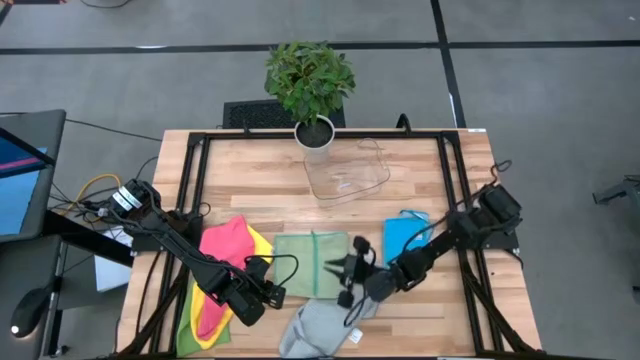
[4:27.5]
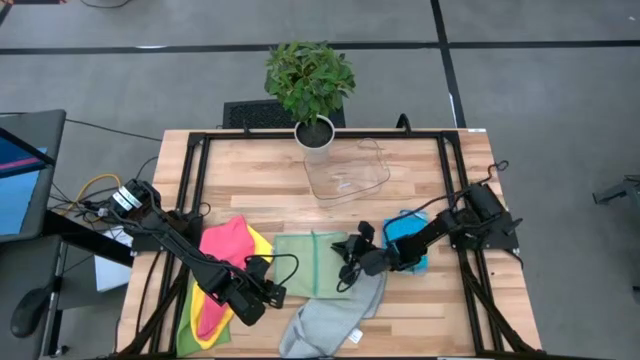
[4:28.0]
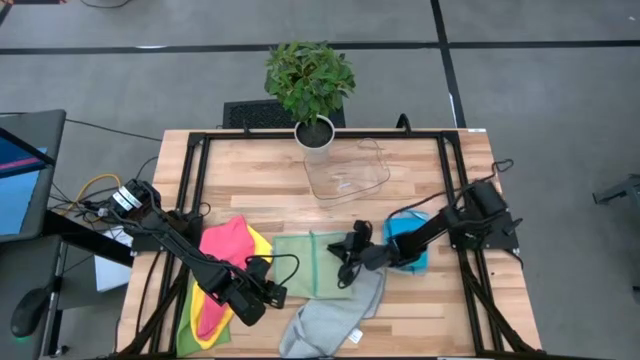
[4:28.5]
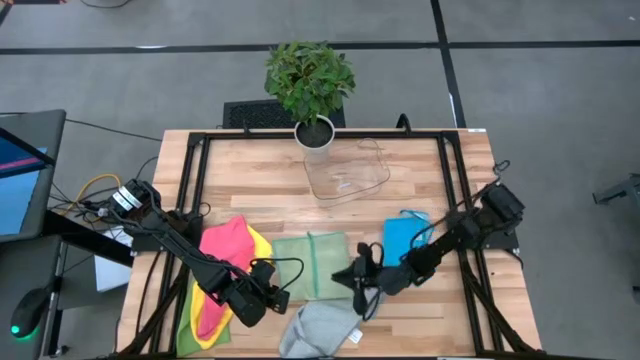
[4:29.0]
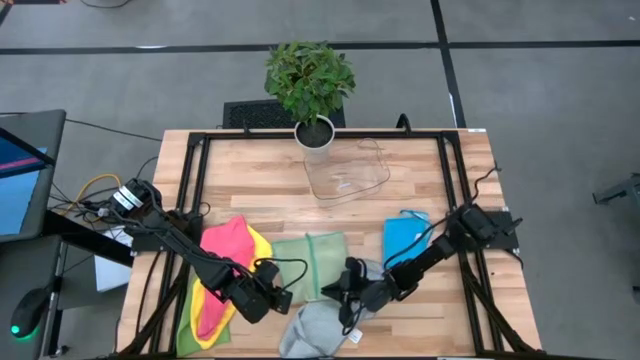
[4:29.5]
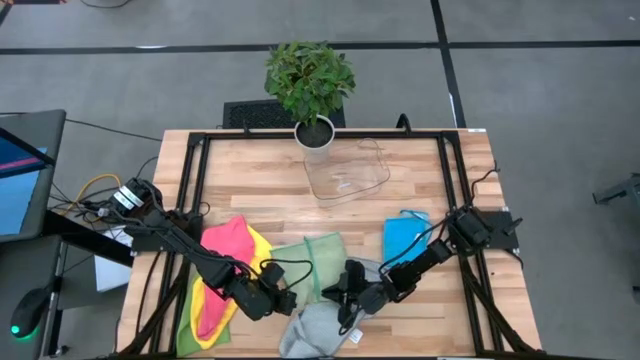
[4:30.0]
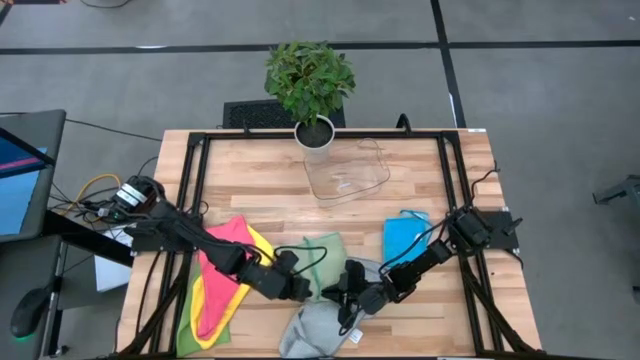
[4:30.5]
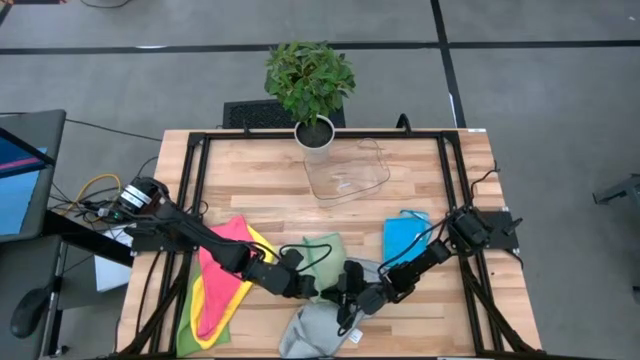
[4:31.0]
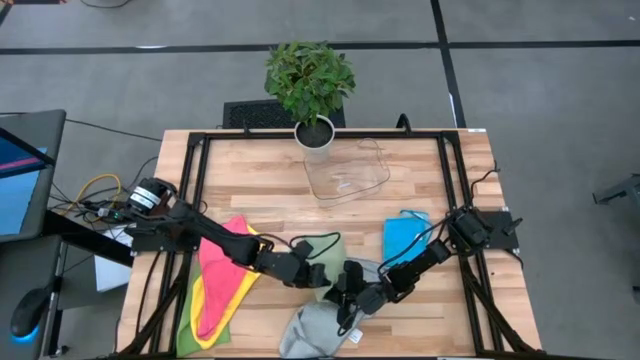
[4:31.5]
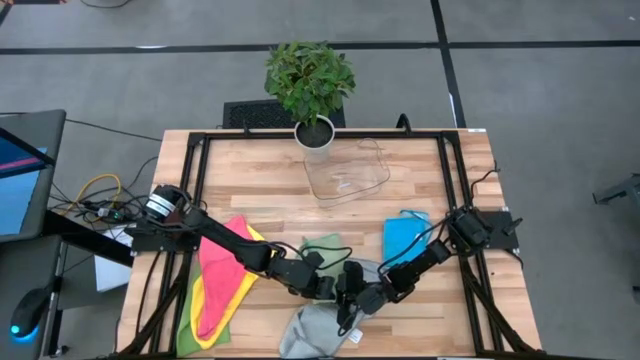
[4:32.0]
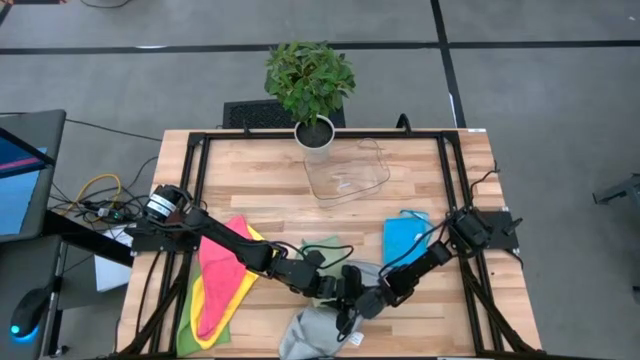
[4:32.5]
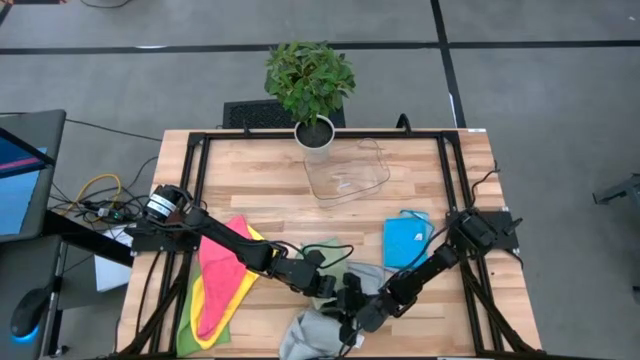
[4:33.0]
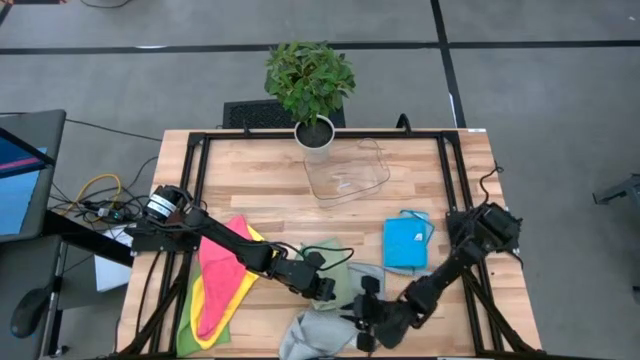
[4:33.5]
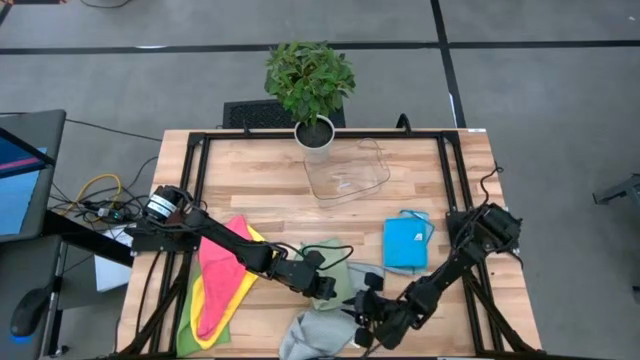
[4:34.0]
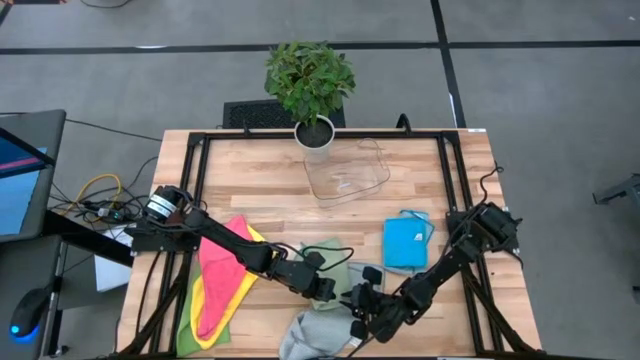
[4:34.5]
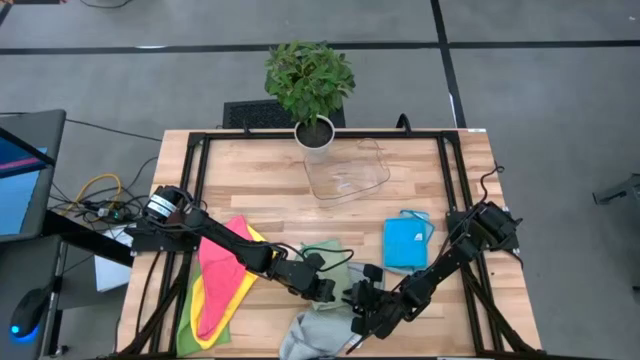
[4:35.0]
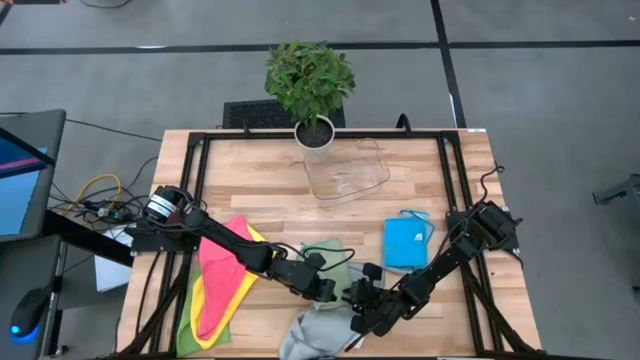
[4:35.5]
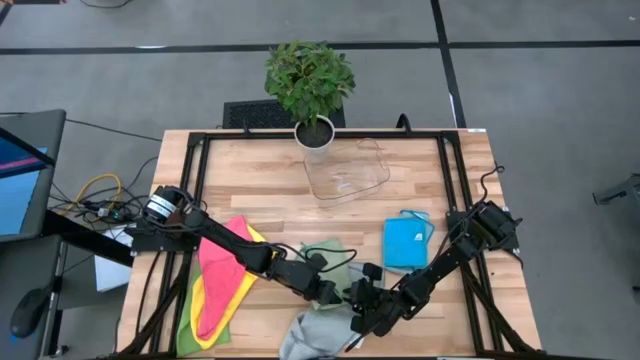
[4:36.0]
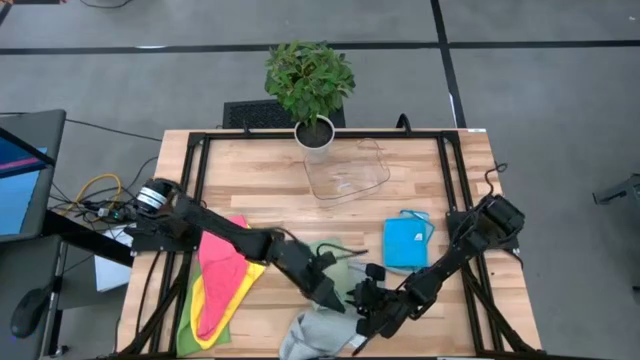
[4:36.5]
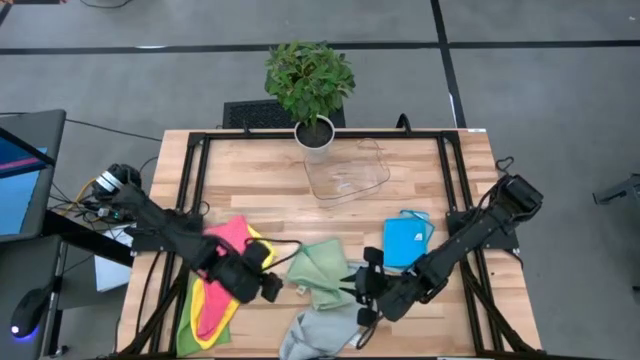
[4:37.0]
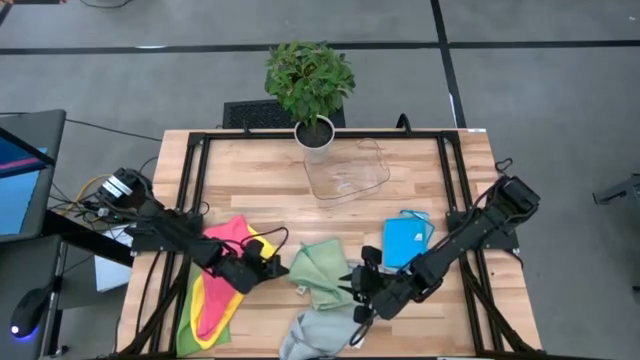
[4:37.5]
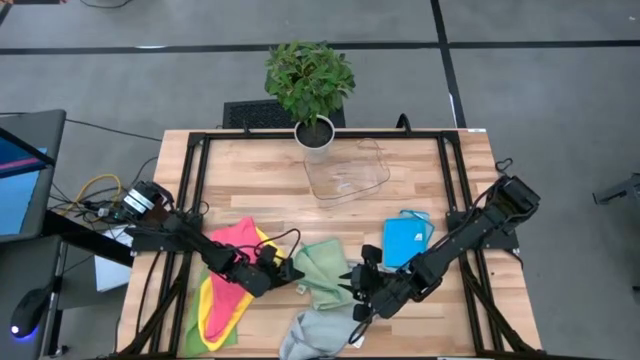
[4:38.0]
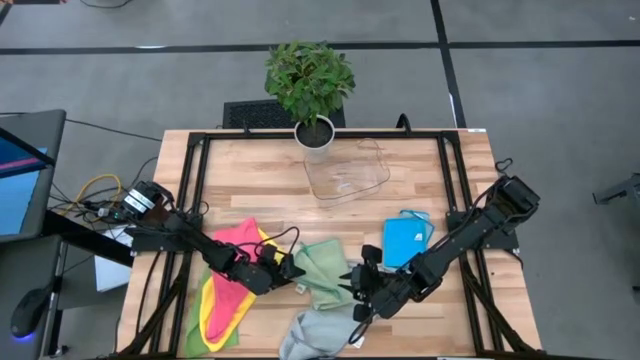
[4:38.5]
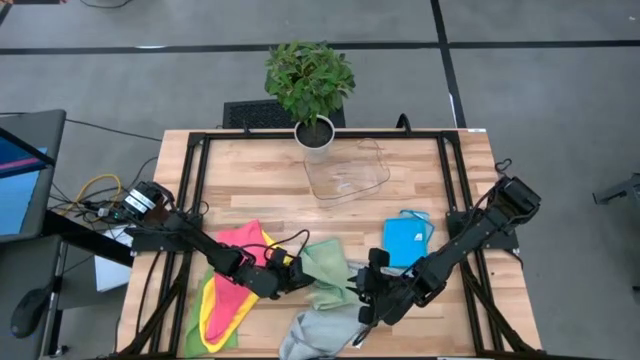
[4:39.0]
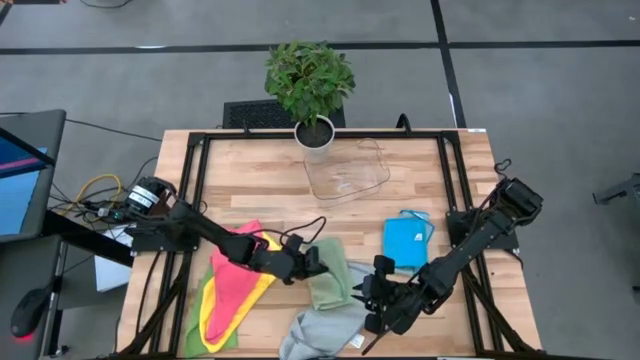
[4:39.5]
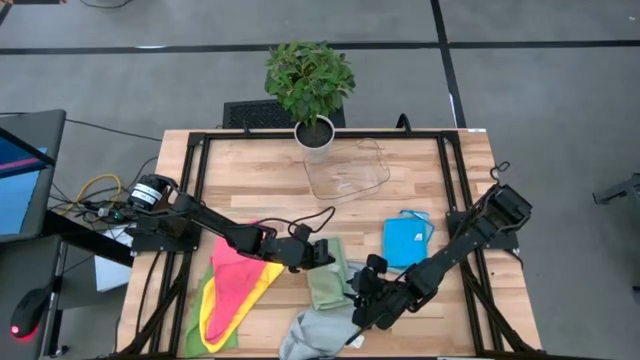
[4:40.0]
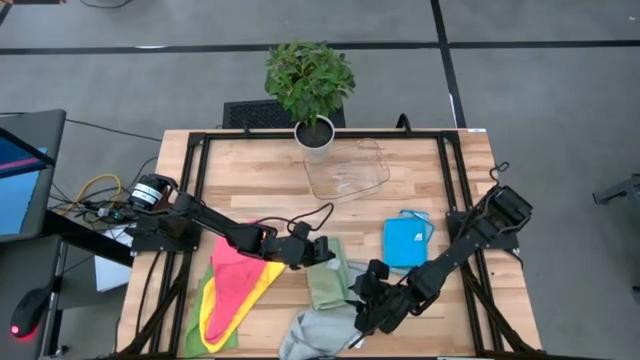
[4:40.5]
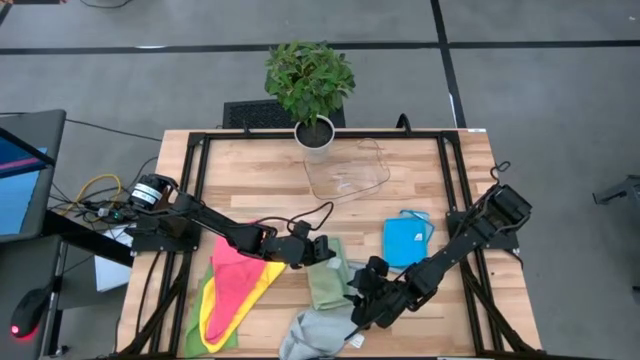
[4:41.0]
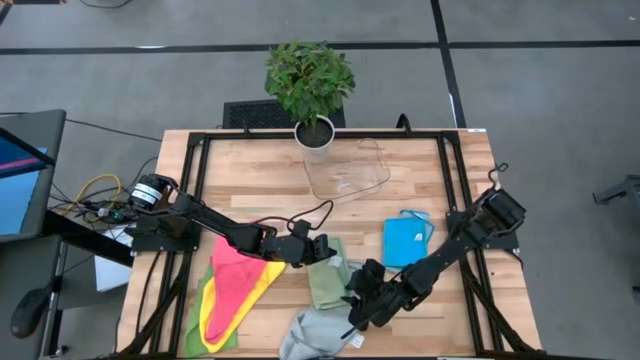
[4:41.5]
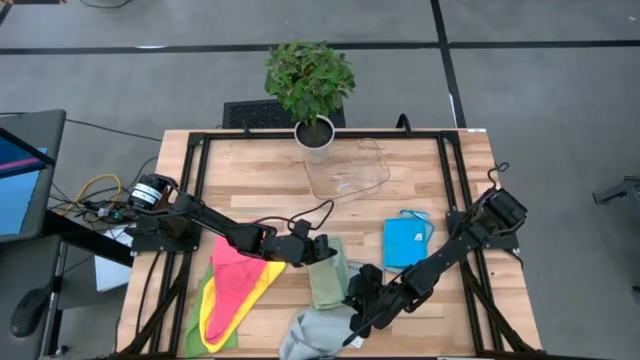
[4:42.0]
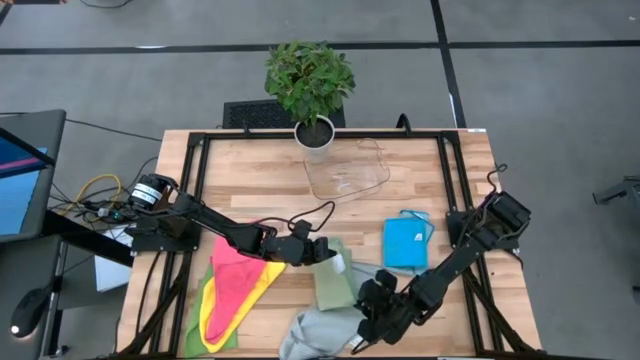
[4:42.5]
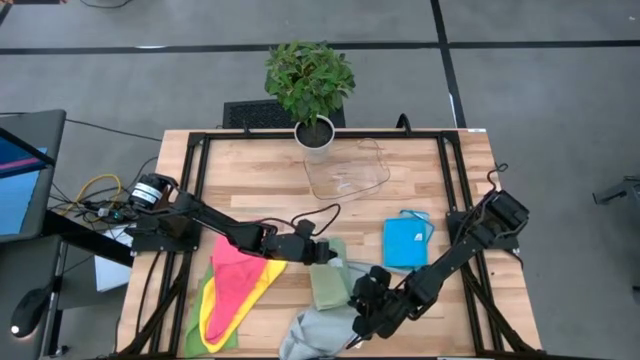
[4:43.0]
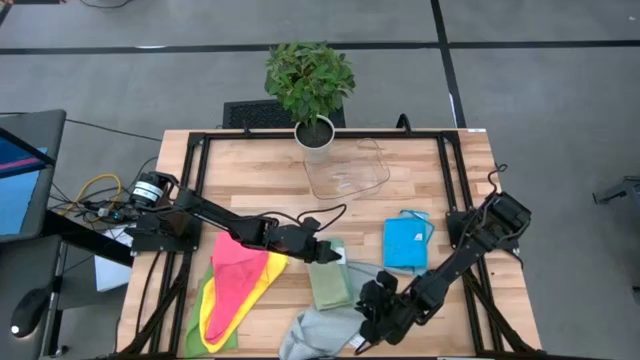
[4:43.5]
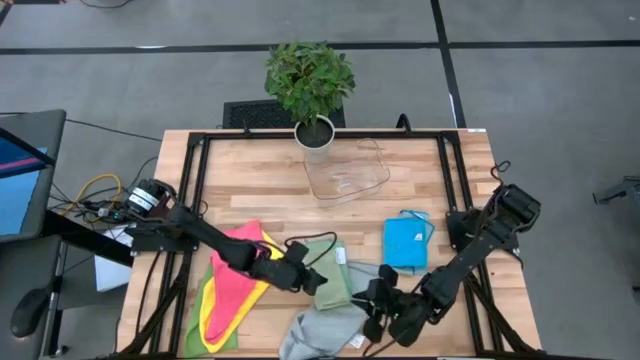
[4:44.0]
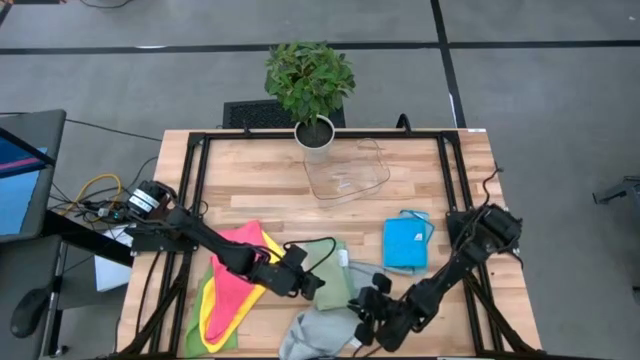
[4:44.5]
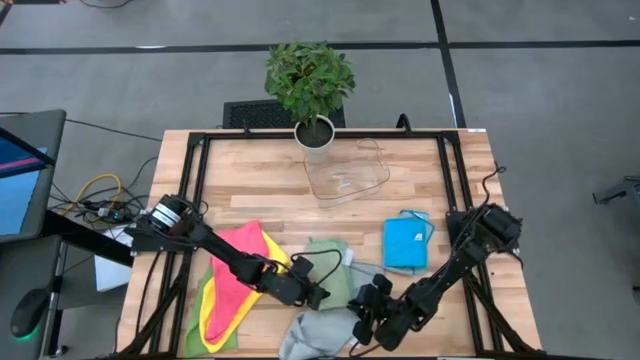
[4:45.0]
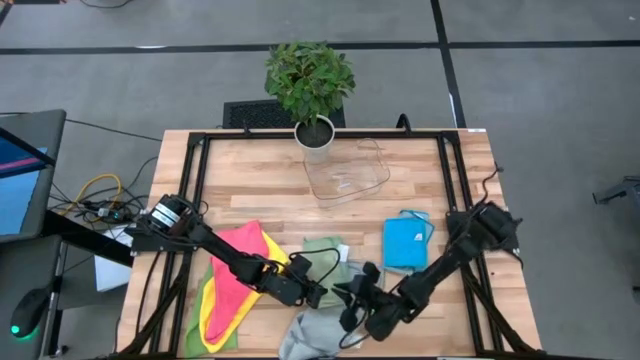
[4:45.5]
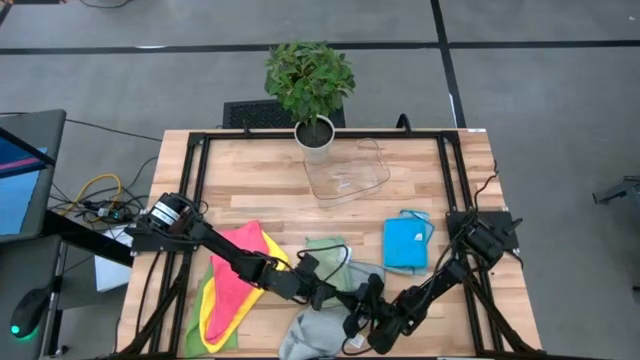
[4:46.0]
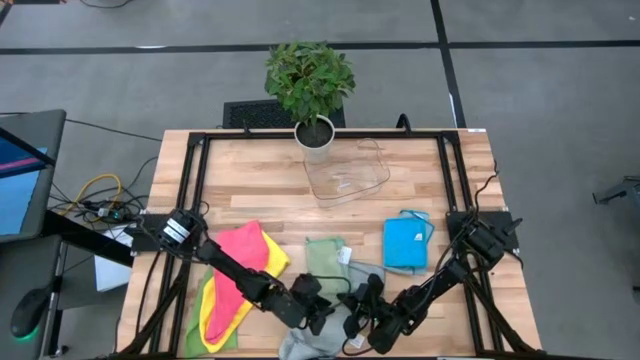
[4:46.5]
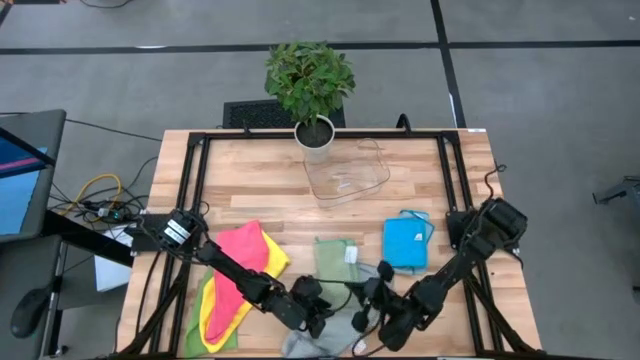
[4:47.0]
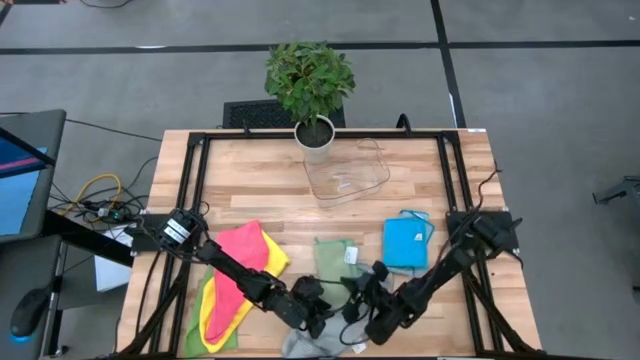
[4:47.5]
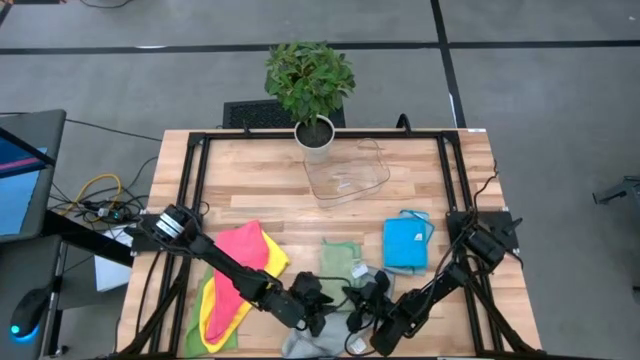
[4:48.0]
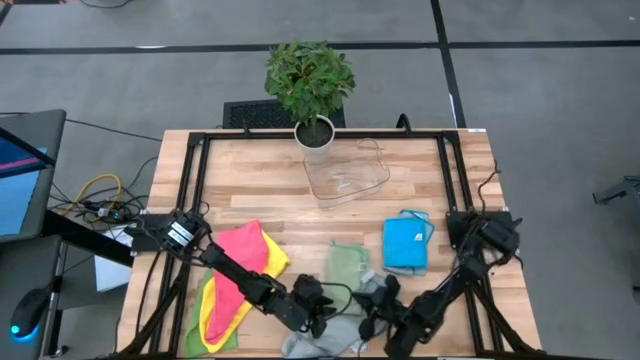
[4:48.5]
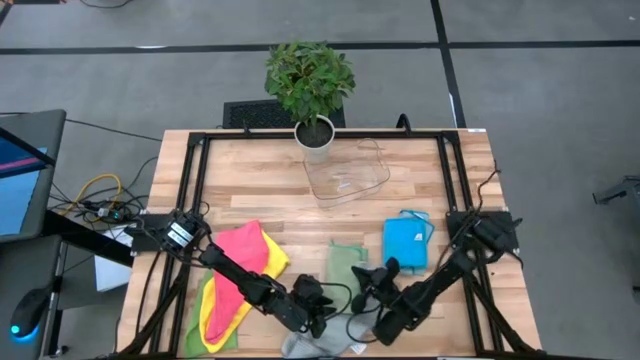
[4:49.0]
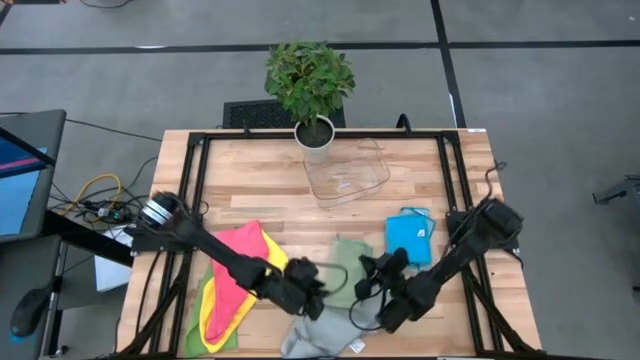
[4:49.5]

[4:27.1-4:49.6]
Task: Fold microfiber towels
Fold the light green microfiber cloth
